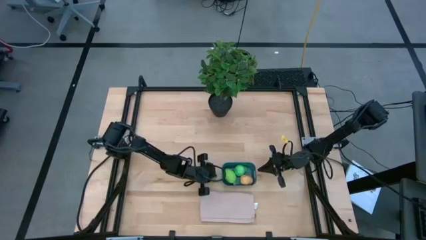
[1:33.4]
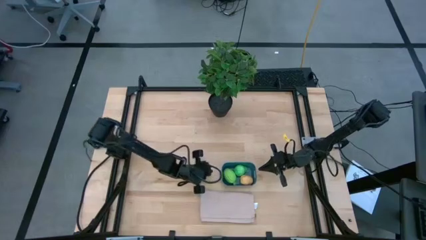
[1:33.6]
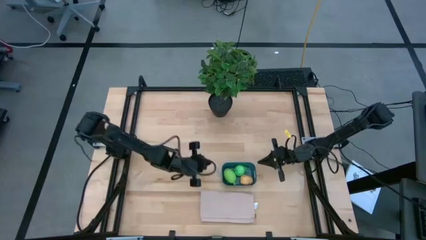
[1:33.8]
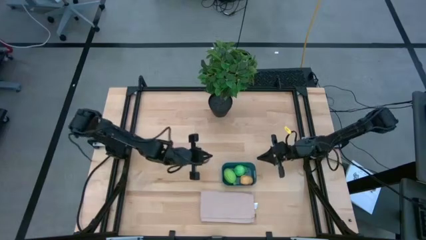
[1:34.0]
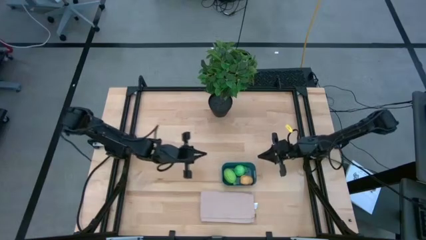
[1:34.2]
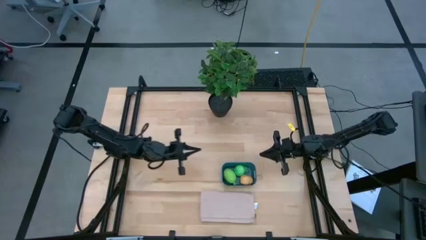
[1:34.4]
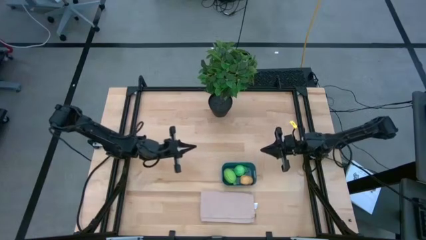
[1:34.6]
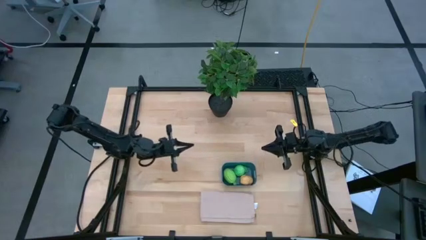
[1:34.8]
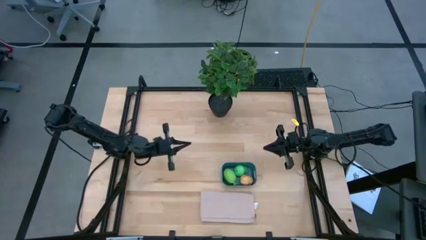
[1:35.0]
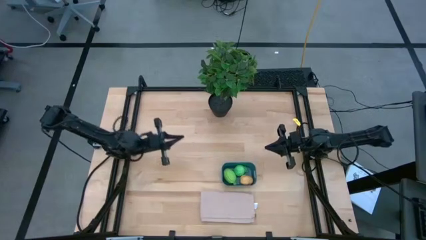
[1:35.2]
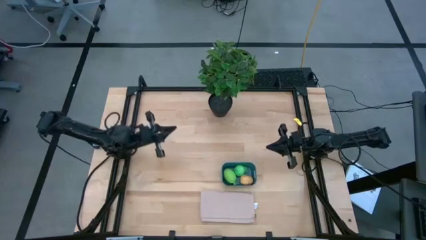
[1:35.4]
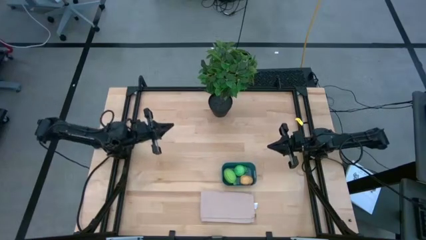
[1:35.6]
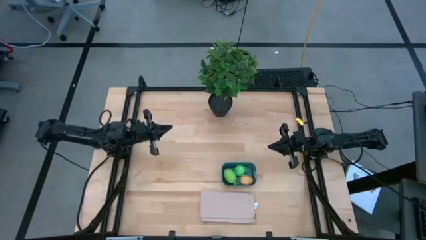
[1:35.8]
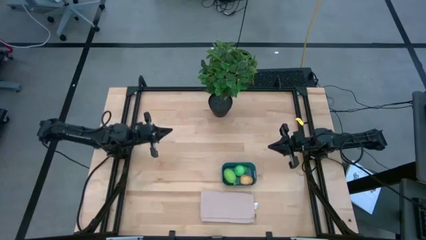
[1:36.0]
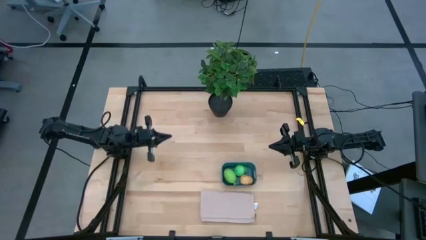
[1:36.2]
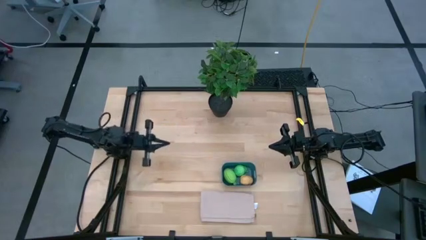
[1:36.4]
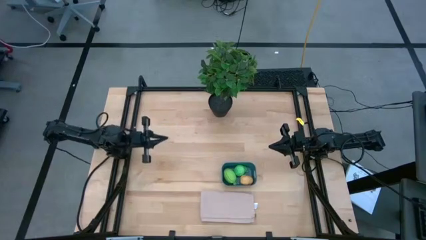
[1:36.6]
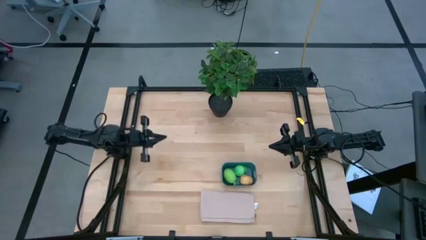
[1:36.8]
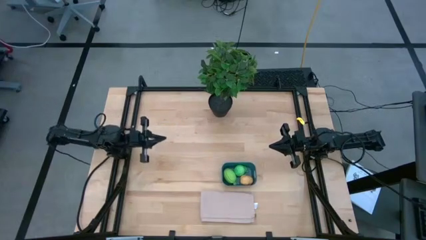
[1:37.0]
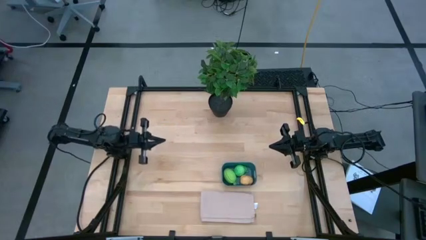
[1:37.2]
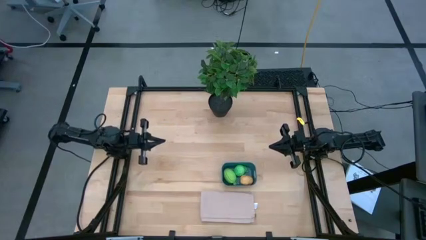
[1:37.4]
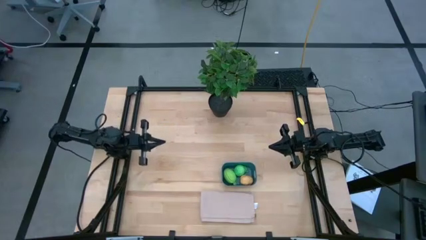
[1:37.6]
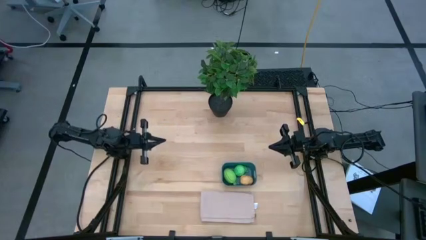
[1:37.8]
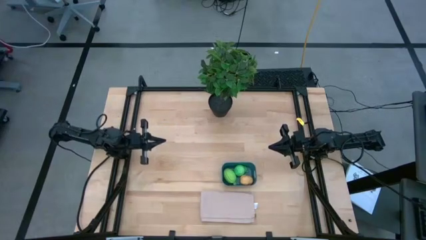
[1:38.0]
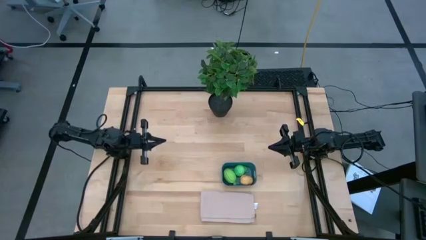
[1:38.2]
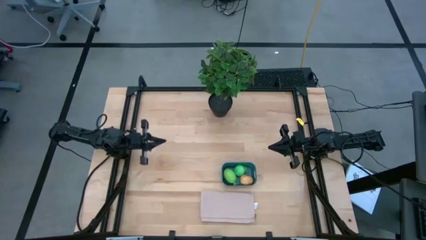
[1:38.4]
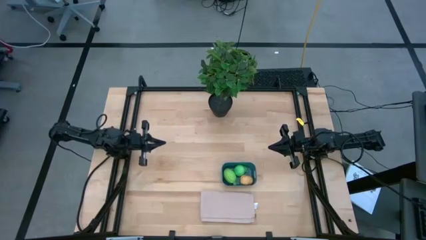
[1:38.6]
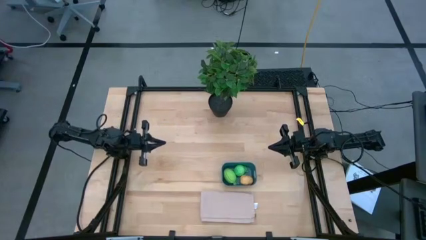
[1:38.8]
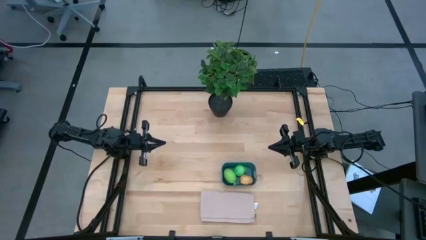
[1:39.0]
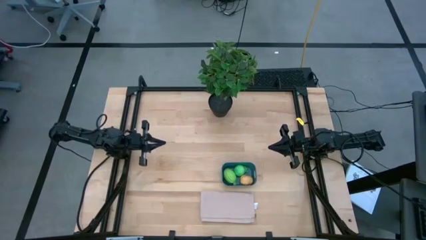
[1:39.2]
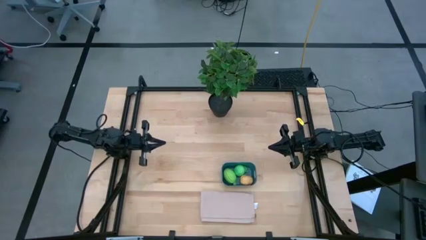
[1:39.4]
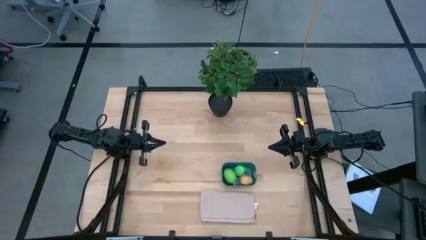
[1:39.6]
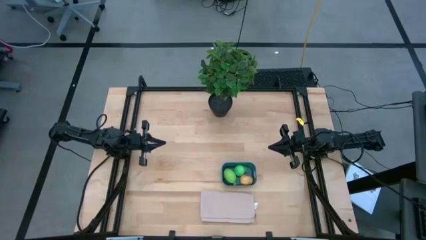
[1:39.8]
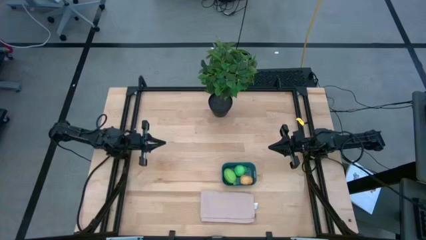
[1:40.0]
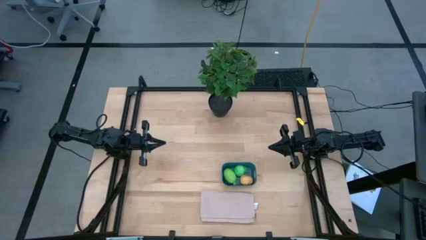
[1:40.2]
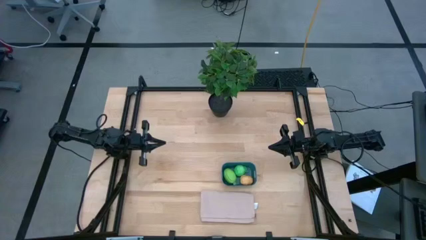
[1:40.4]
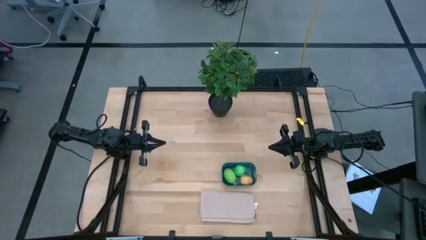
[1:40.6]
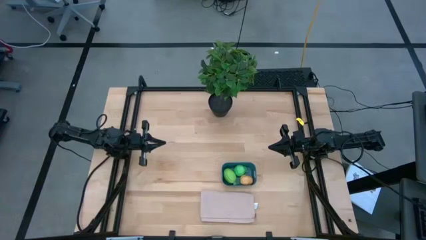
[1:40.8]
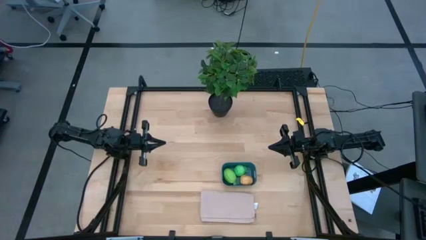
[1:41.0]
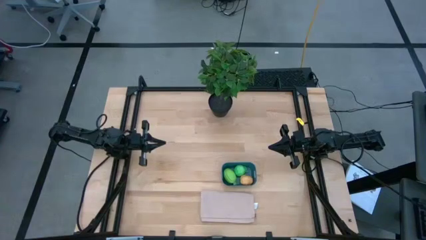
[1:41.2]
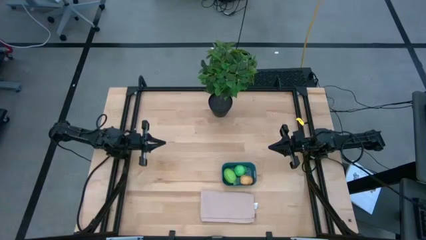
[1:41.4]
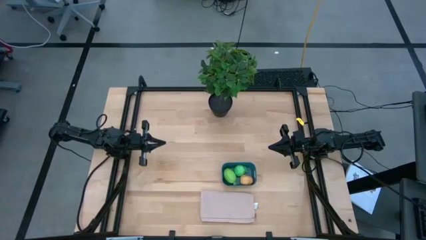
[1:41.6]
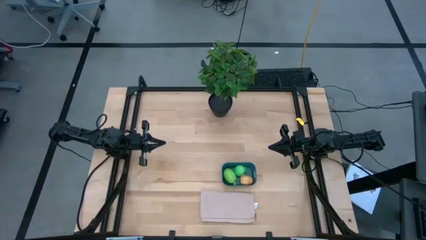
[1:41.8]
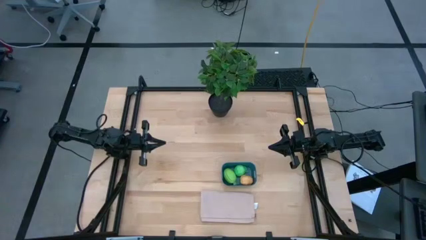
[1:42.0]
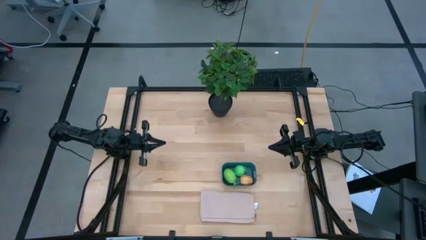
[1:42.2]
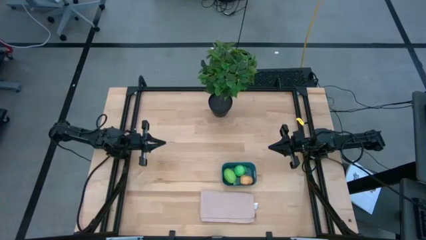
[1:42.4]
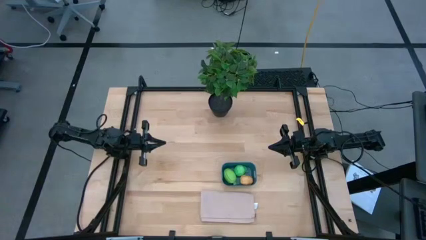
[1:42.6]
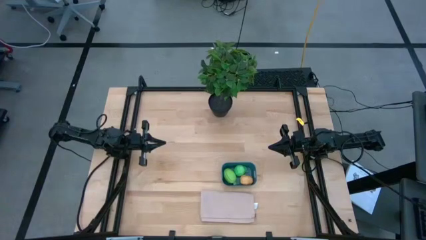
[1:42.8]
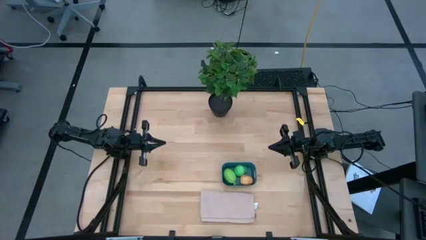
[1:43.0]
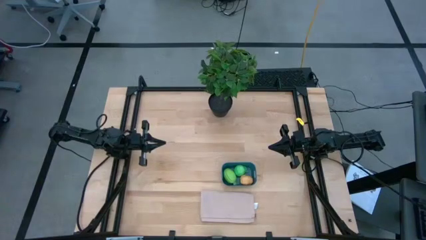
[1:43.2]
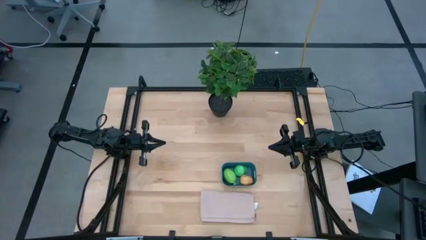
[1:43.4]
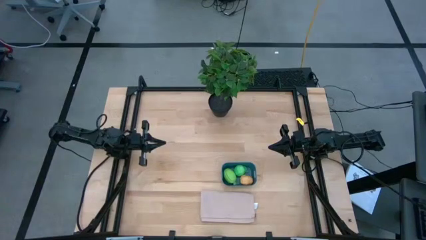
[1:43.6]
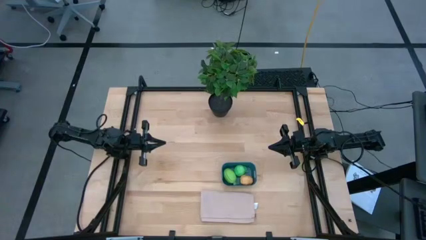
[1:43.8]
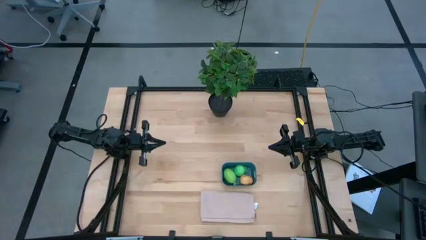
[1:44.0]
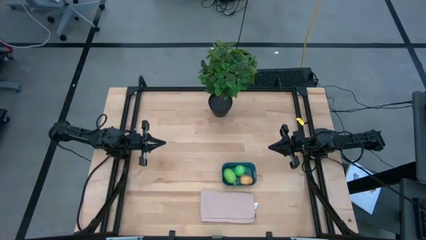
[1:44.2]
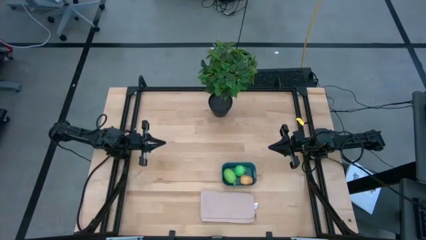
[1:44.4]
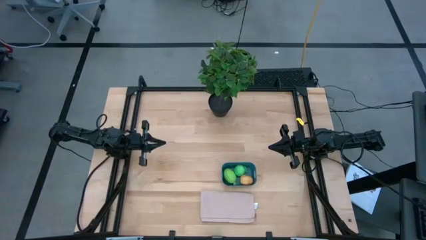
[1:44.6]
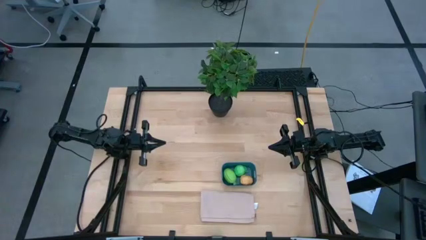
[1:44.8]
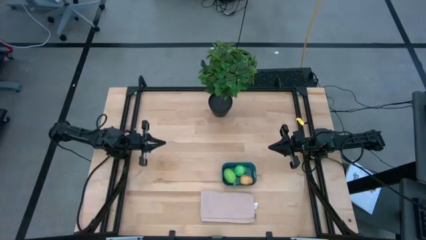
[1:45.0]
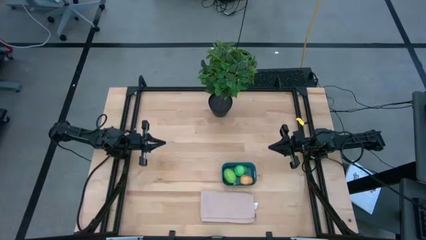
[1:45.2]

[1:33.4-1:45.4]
Task: Pick and placing Produce into tupperware
Return to Home Position
